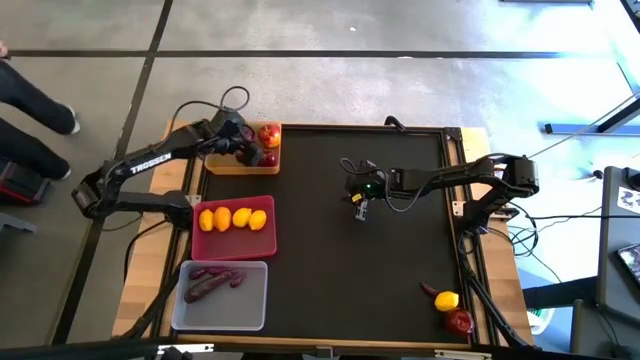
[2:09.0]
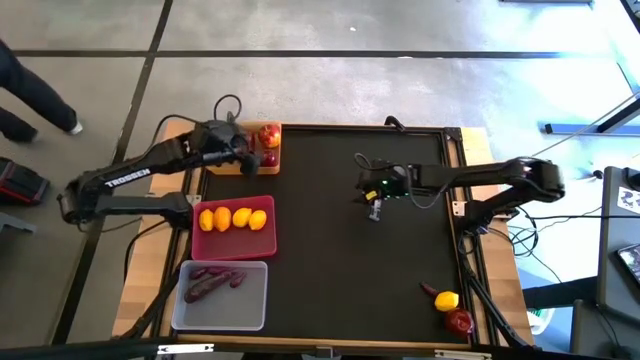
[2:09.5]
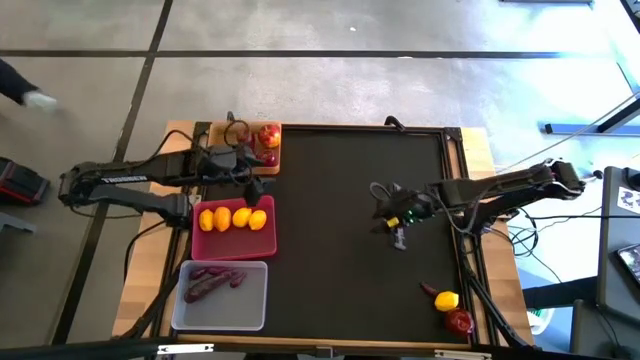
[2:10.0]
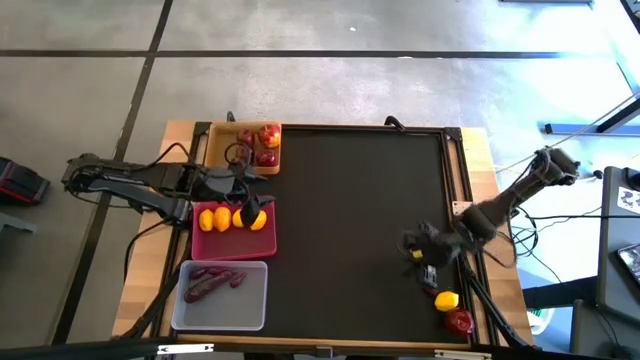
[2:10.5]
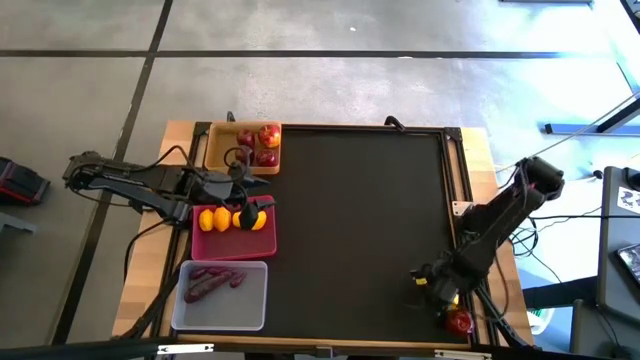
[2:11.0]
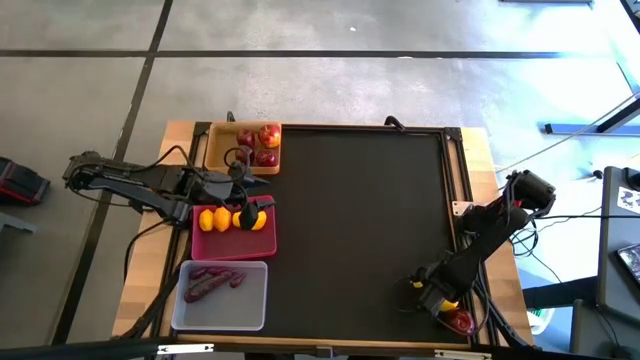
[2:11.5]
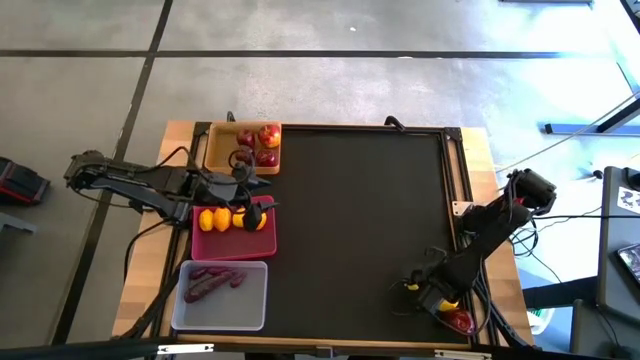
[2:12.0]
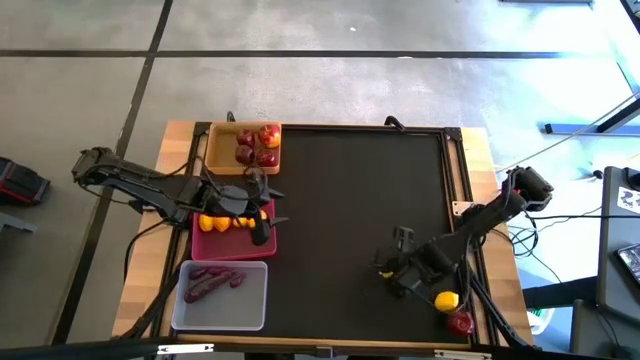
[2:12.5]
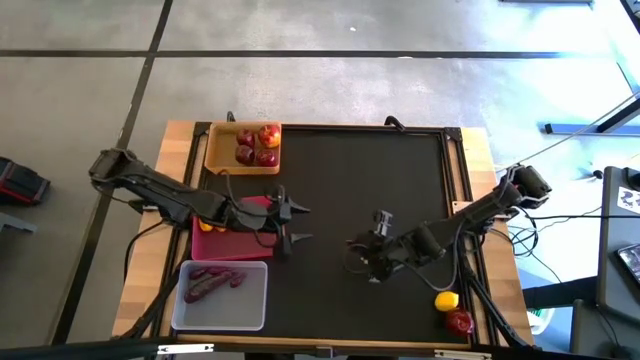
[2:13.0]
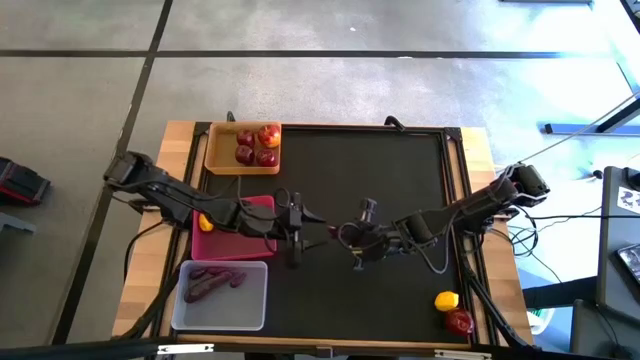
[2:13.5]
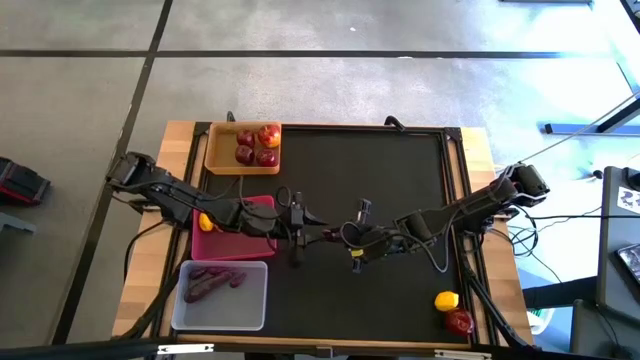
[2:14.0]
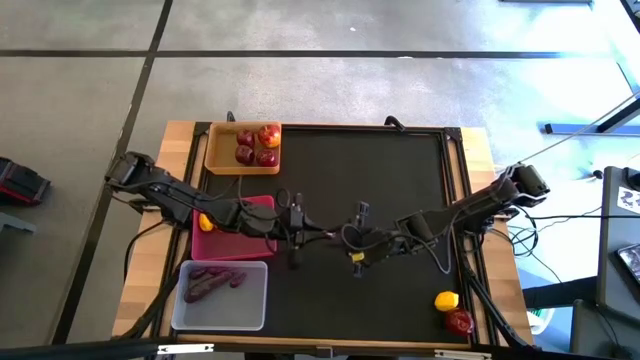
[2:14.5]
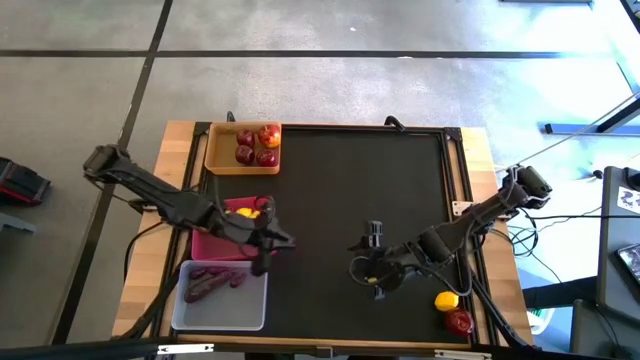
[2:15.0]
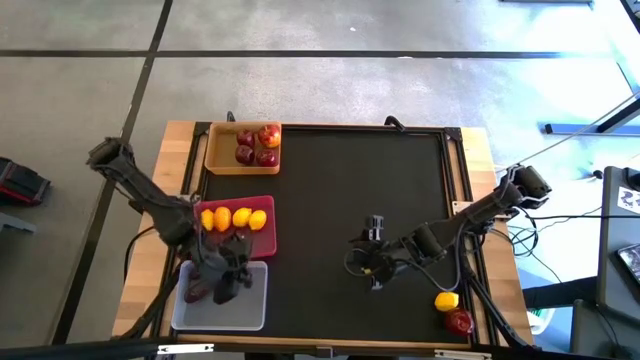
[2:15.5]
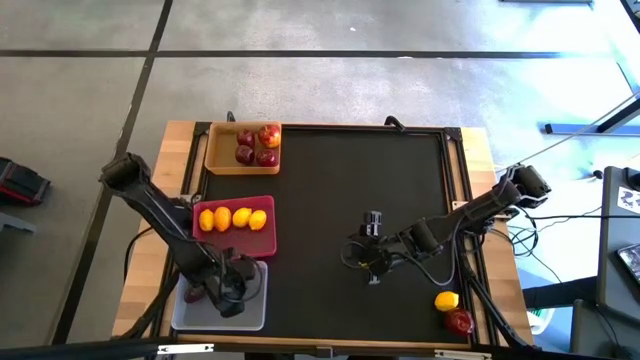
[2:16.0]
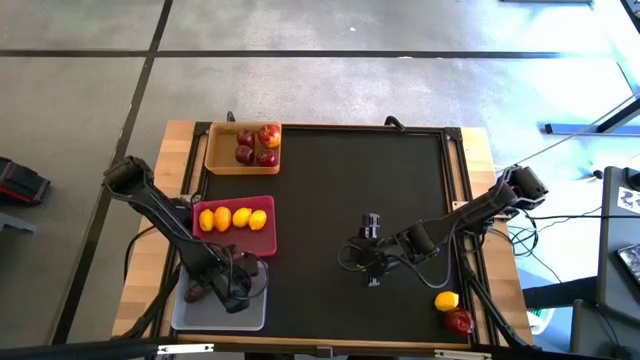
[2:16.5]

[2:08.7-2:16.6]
Task: Sort produce into baskets
Put the eggplant into the transparent bin

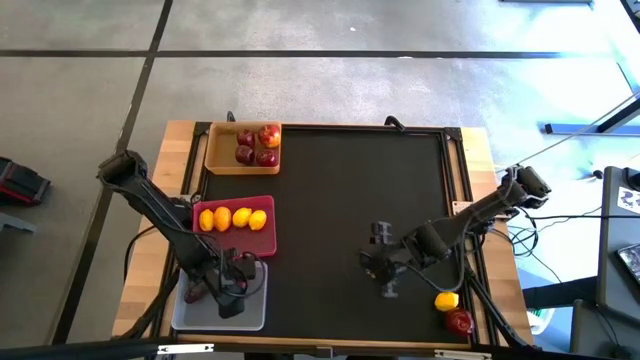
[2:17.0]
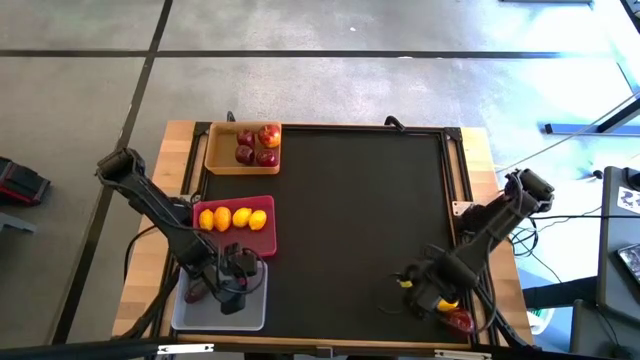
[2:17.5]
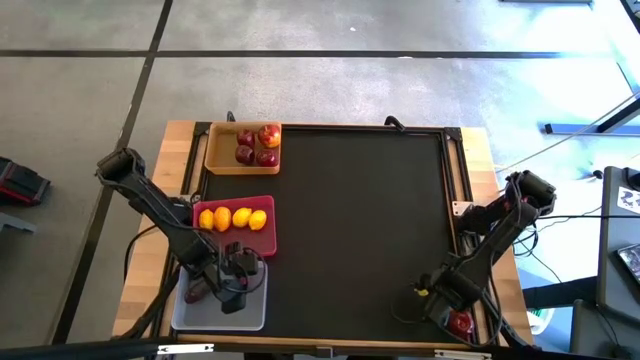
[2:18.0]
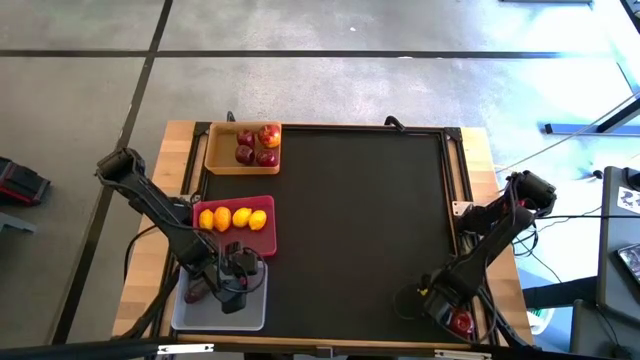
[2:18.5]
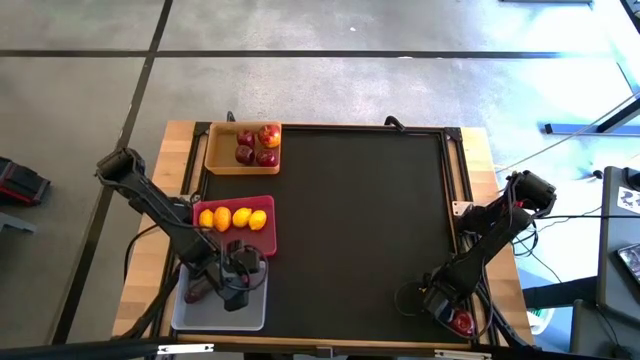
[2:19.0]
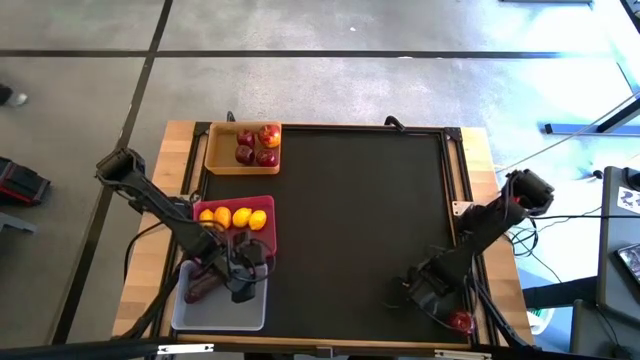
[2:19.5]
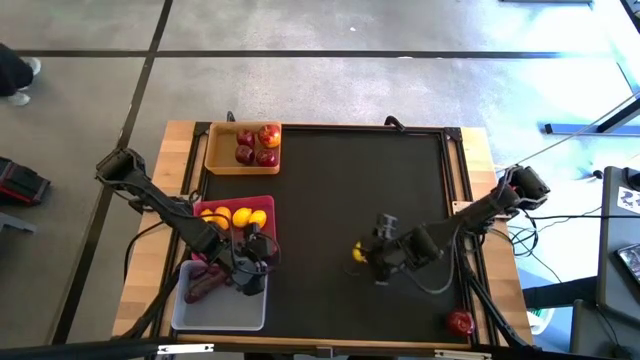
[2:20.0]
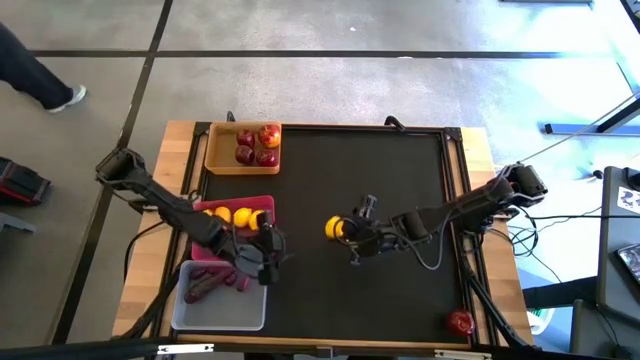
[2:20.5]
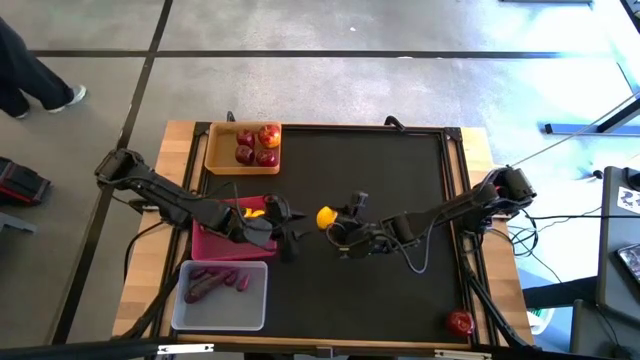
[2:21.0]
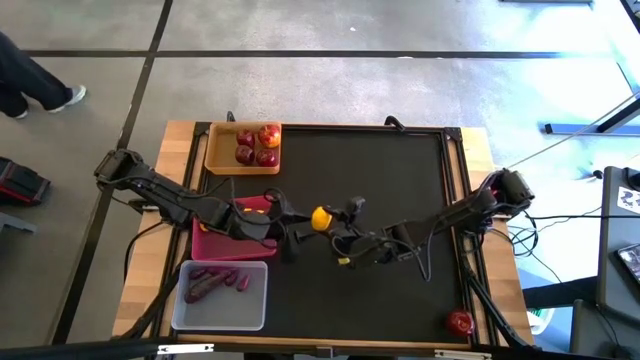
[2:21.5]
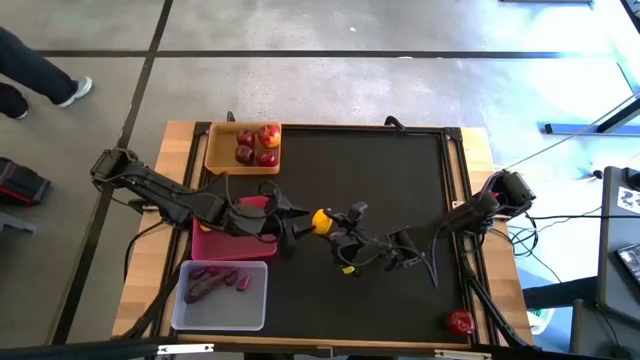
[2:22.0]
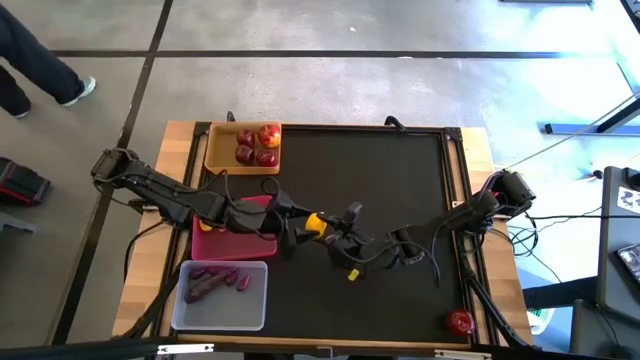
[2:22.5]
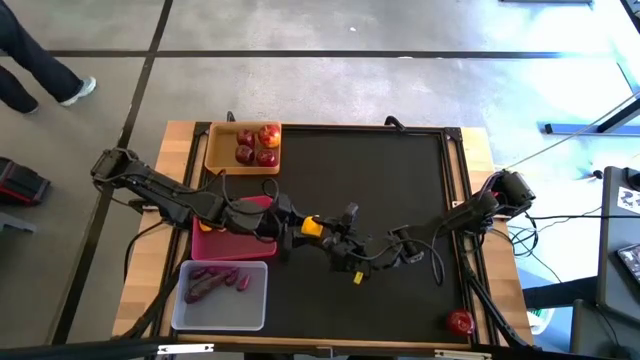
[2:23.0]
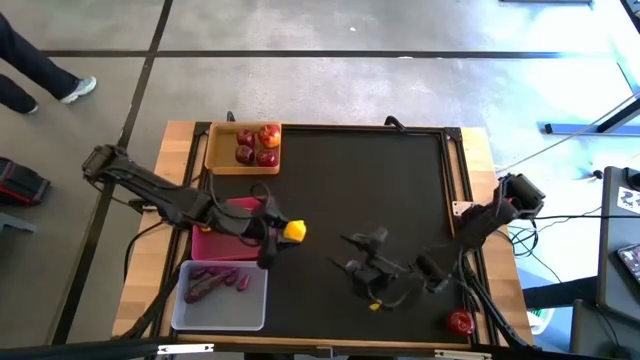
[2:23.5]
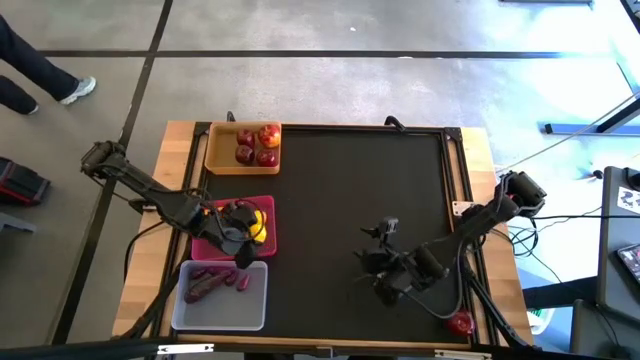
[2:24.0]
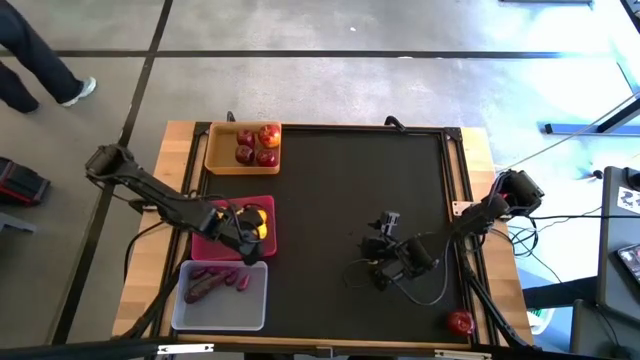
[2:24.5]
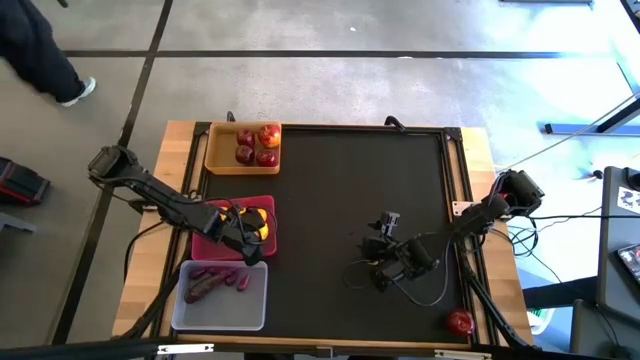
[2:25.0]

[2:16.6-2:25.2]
Put the lemon into the pink bin

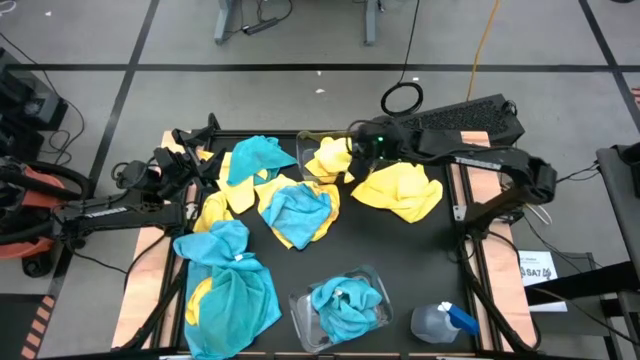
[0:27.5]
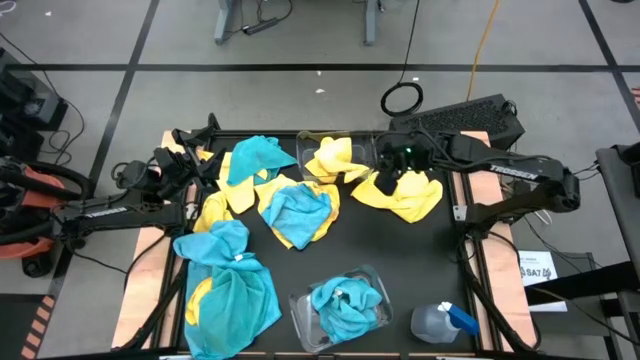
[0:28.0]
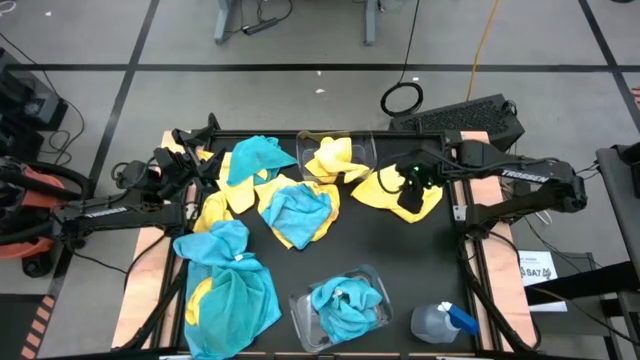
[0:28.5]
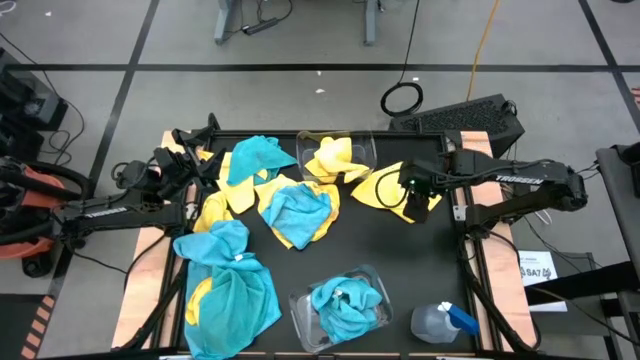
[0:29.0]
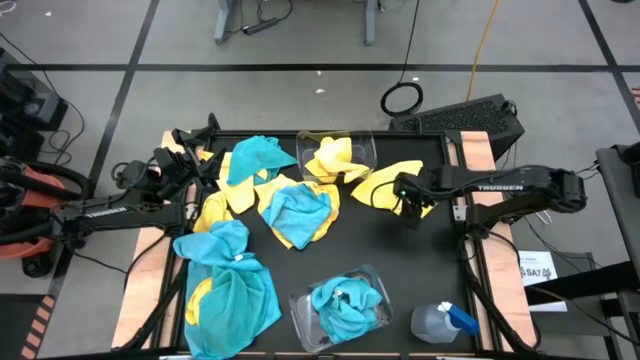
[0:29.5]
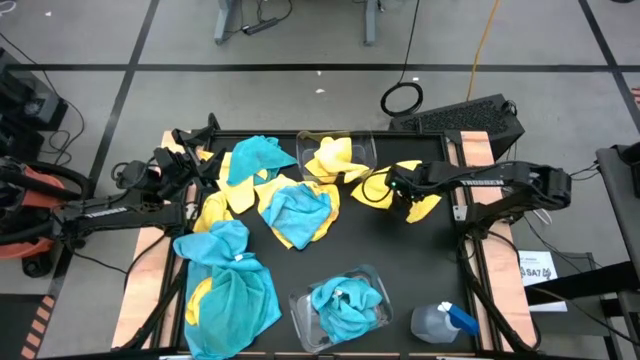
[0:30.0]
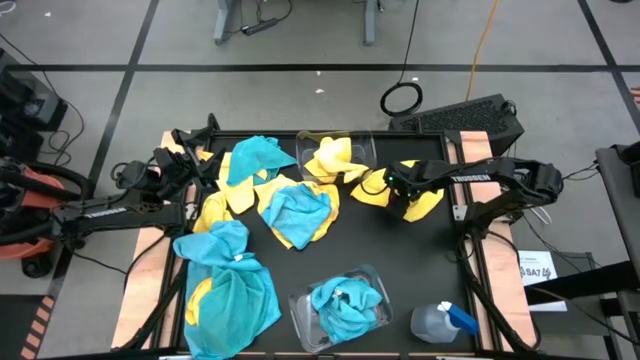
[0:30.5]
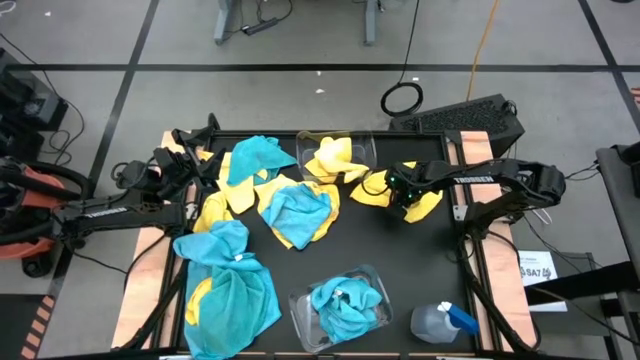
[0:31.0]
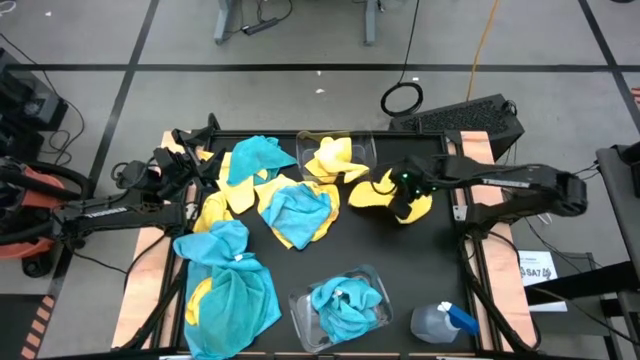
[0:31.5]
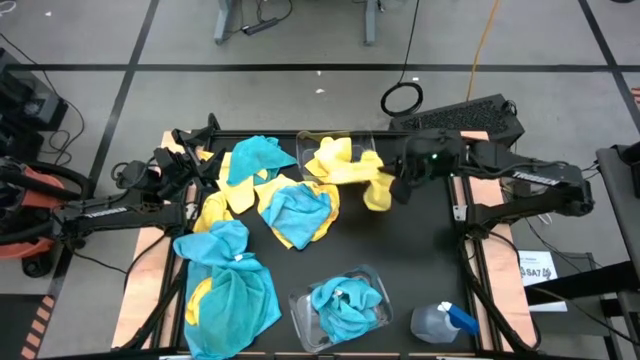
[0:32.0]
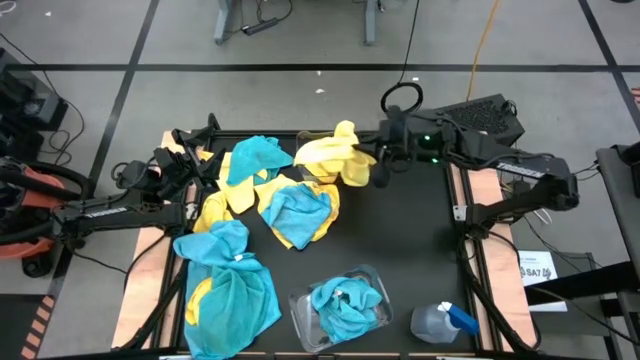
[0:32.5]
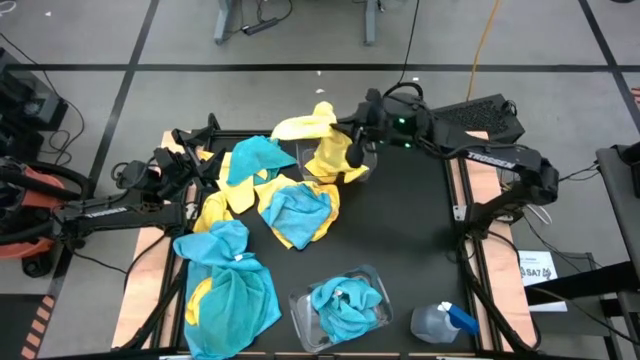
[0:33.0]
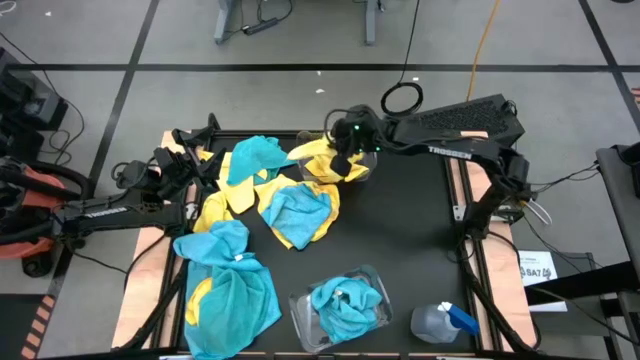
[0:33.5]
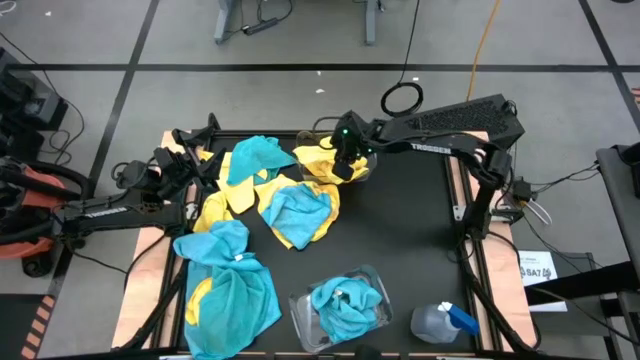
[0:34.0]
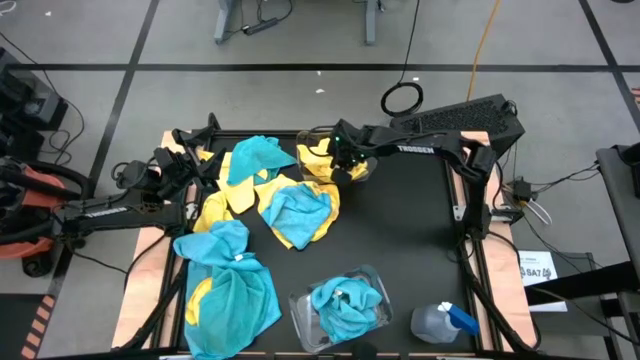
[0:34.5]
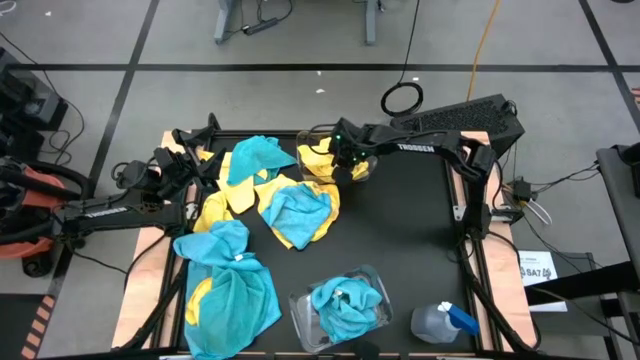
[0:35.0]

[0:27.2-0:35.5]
Task: Sort microfiber towel by color & place in baskets
Put the yellow towel into the top transparent bin
